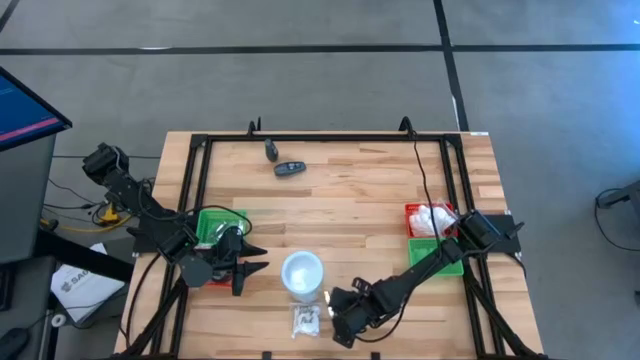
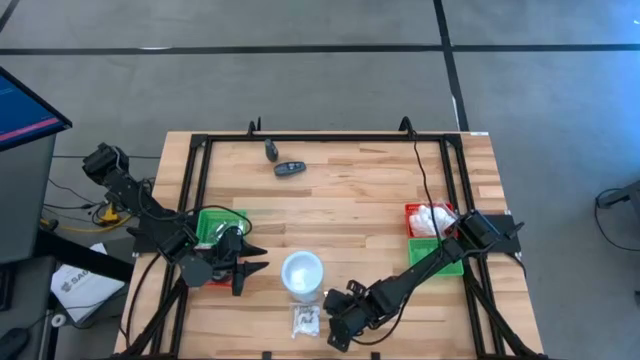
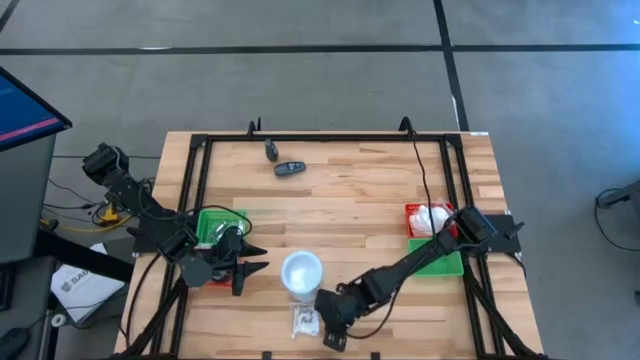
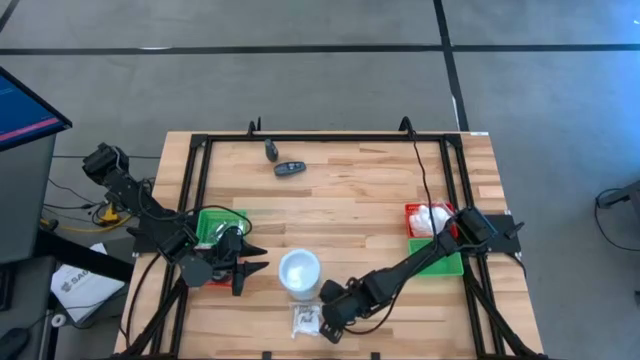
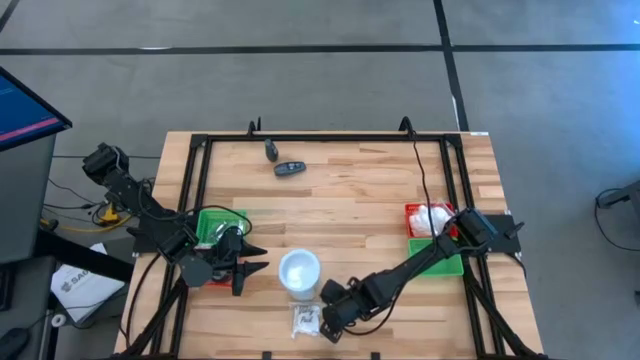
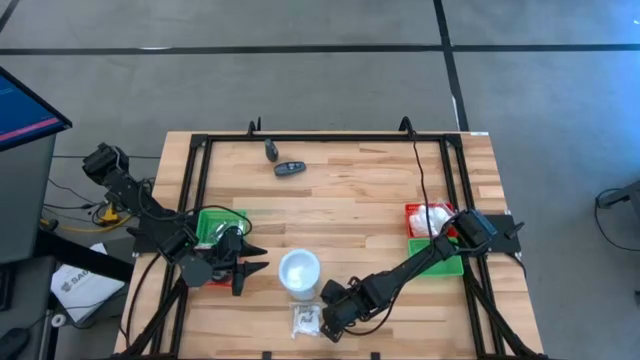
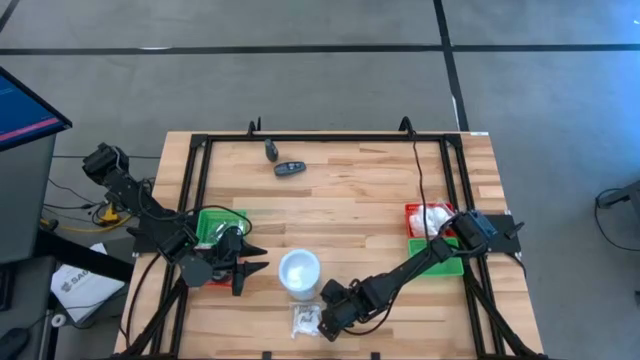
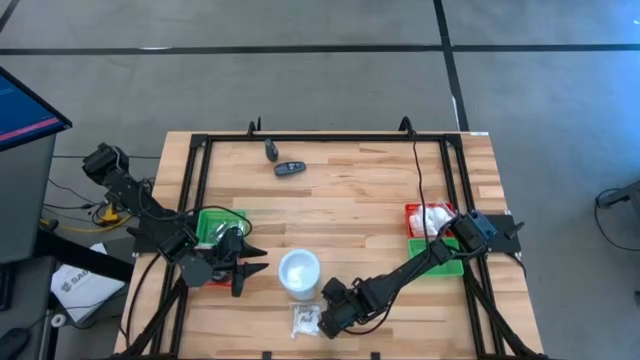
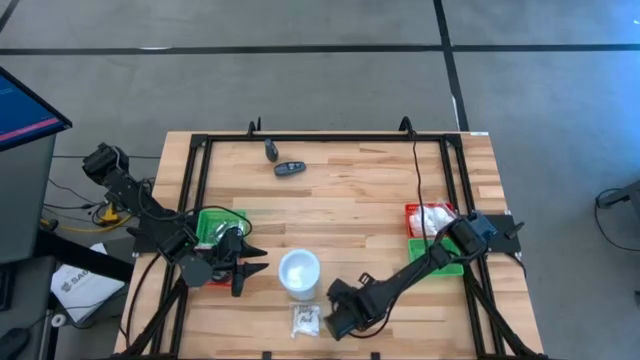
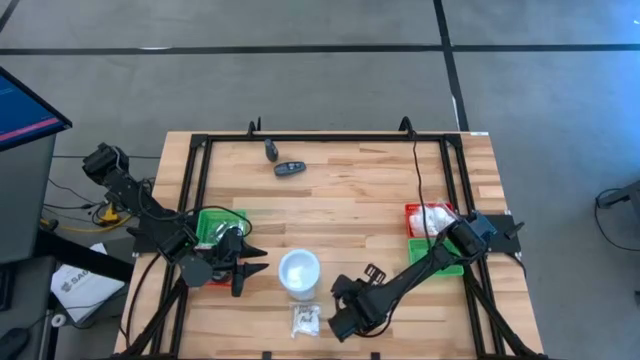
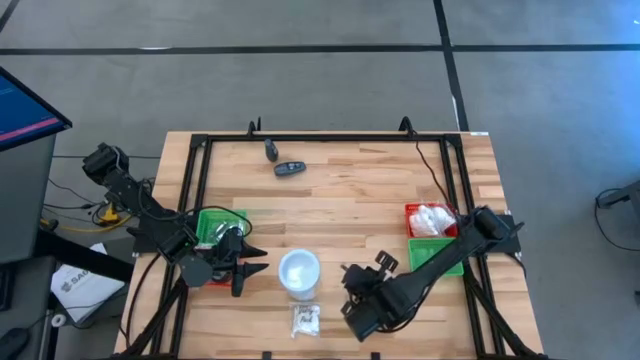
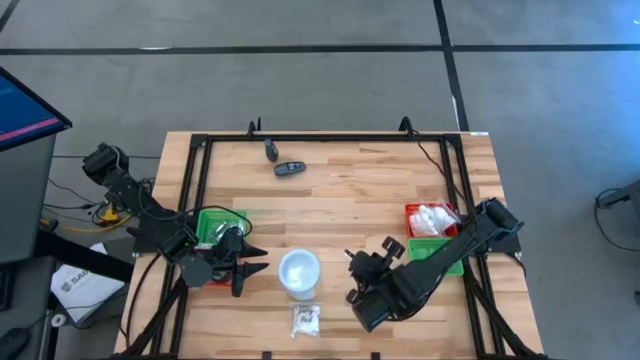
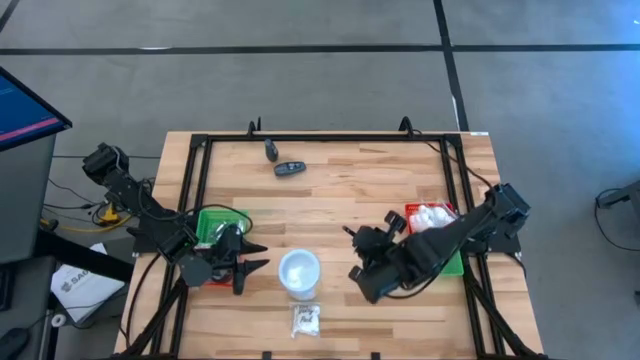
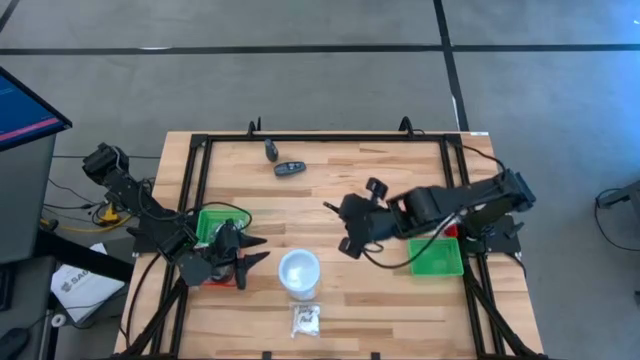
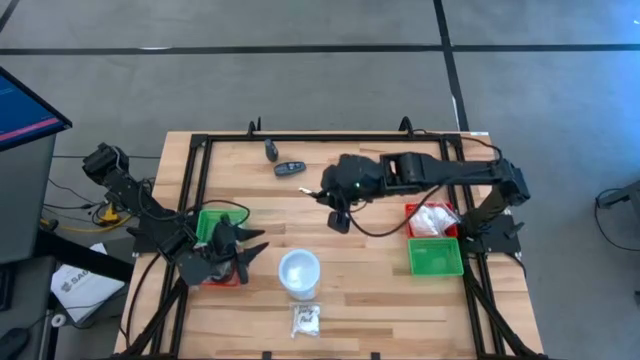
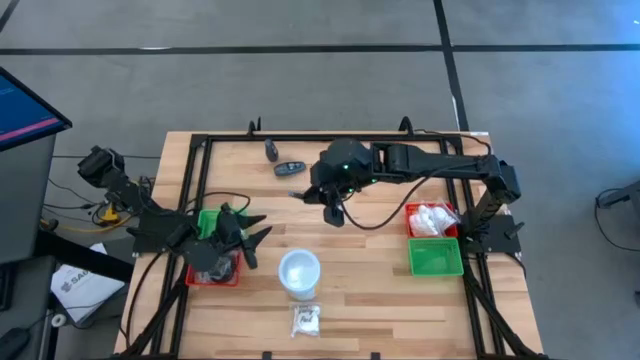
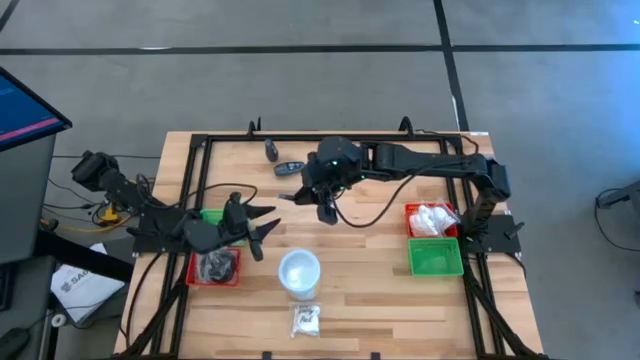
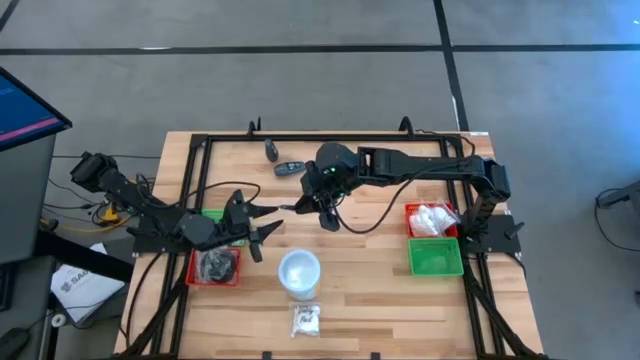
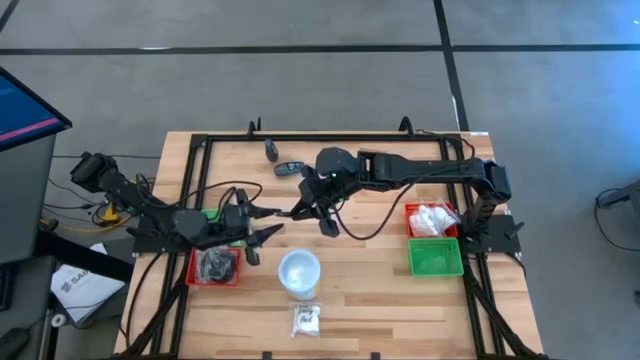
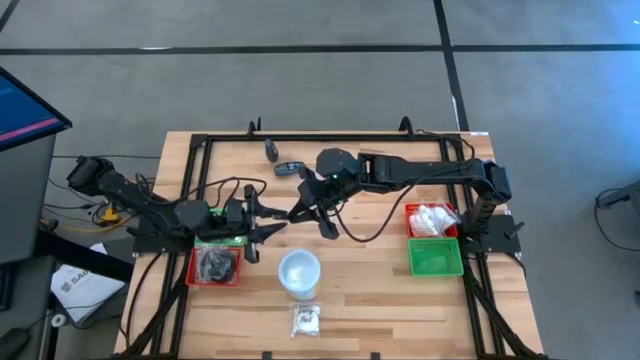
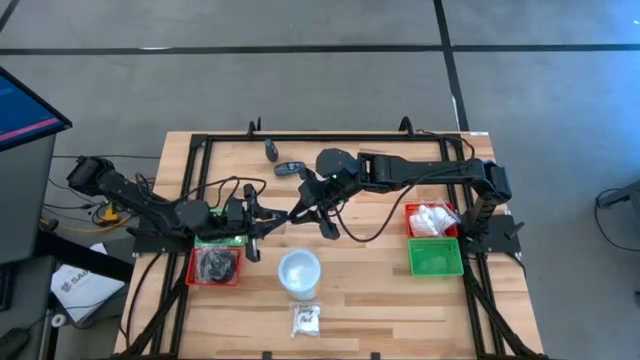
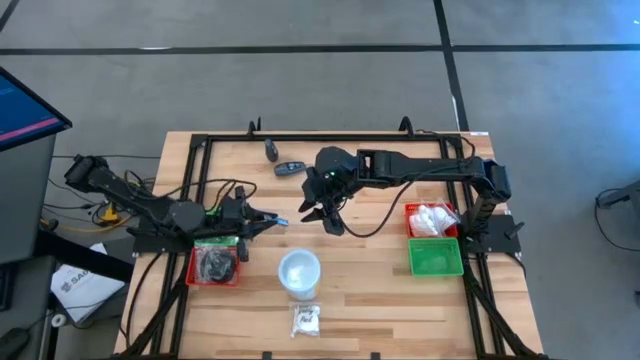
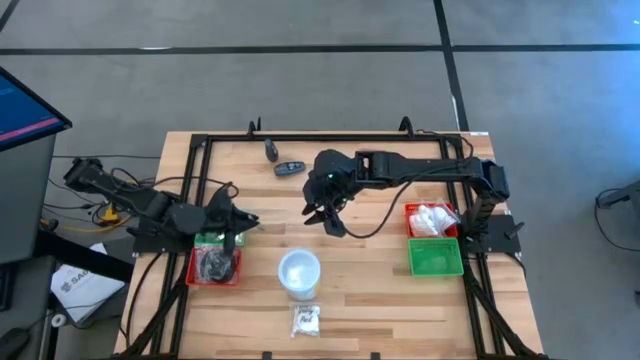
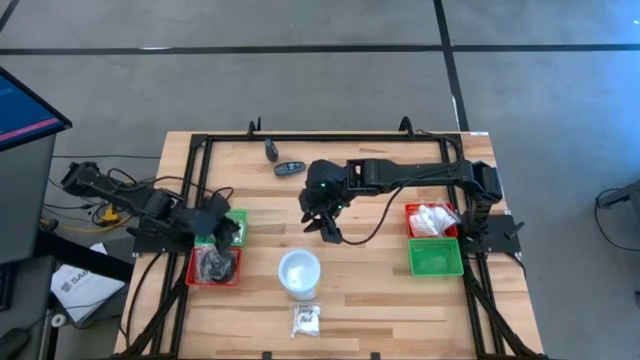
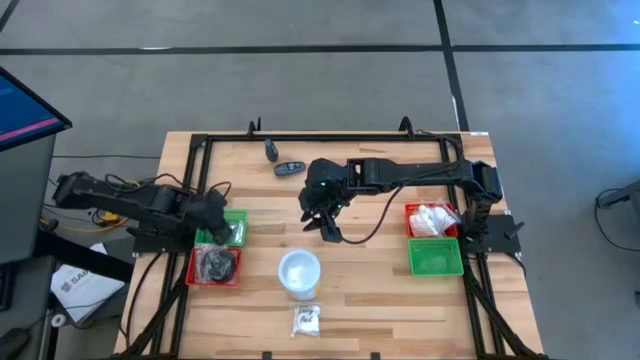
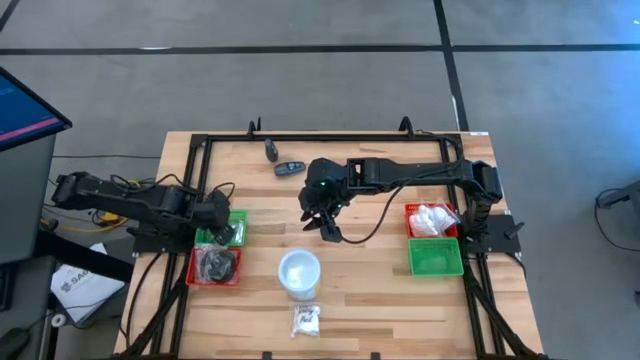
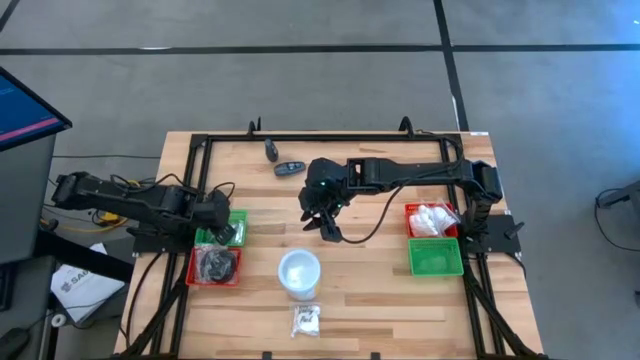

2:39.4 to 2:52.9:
Task: Pick & Place Travel size toiletries
Put the silver nail cutter into the left green bin

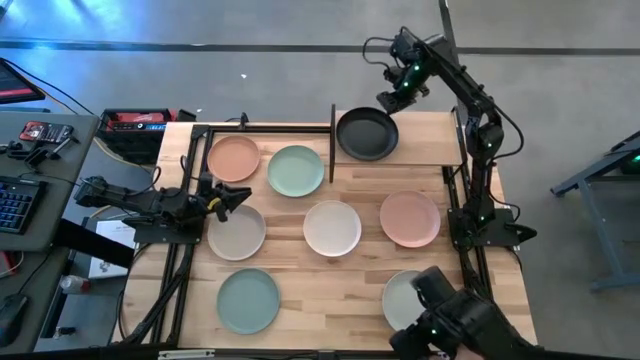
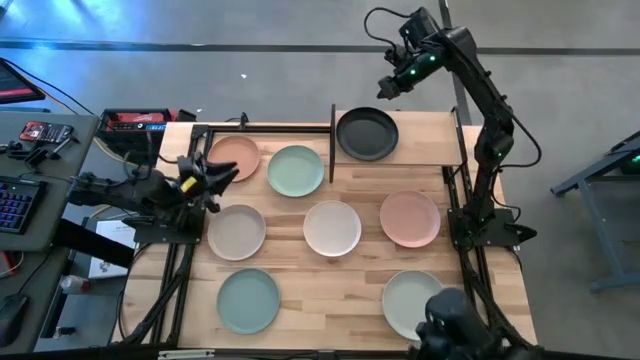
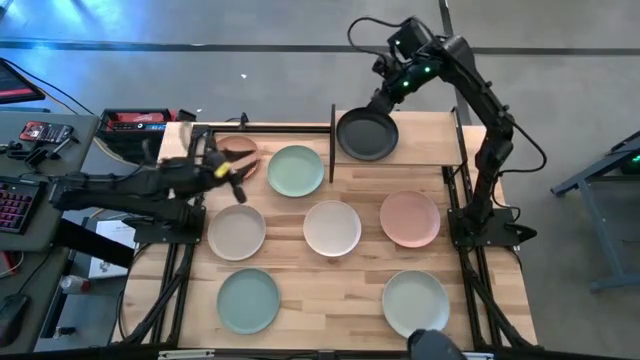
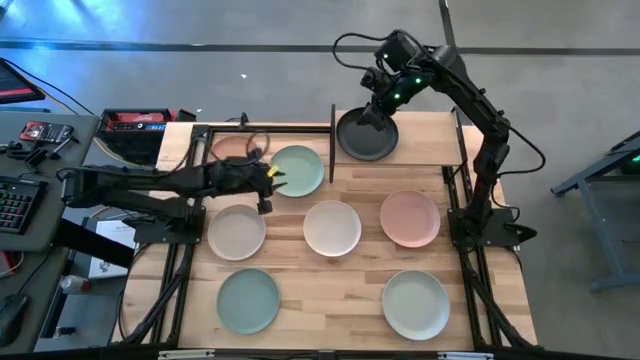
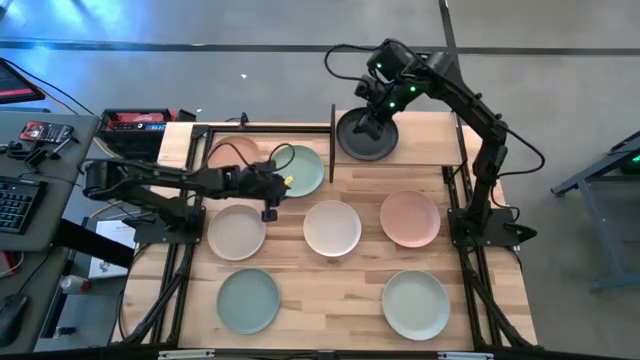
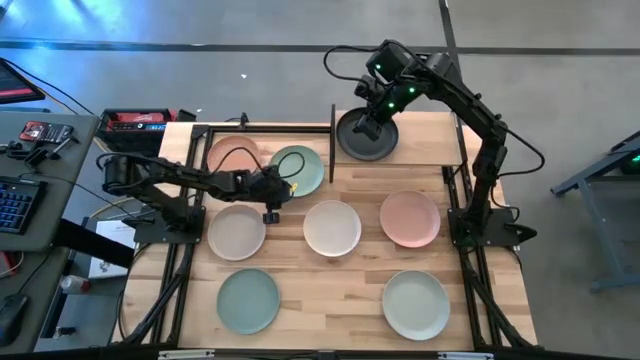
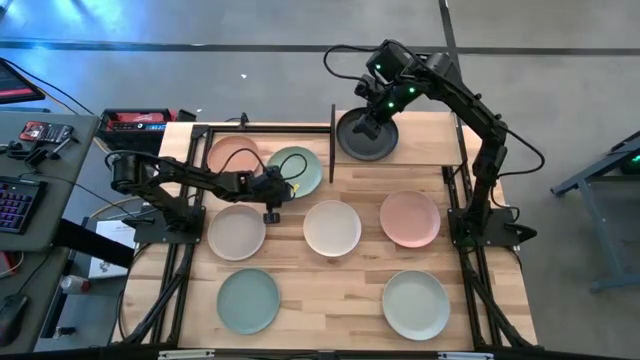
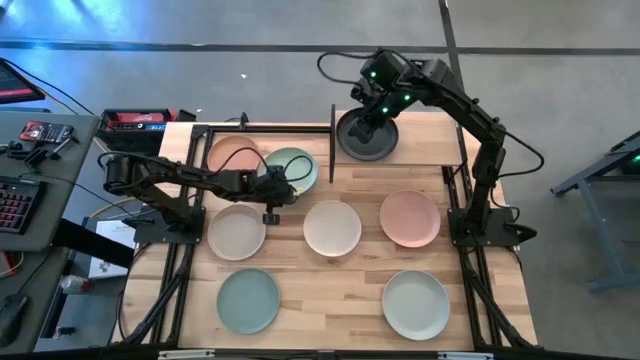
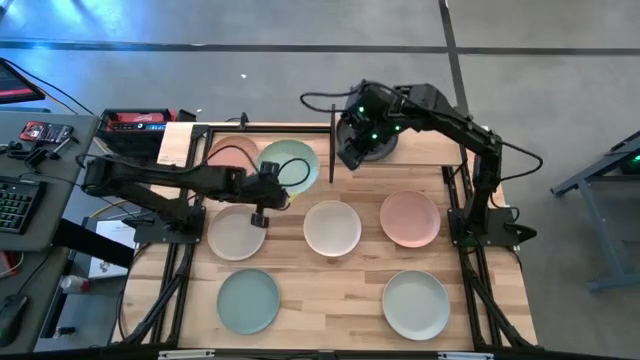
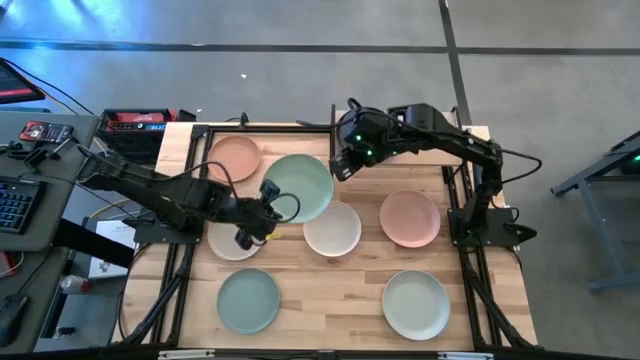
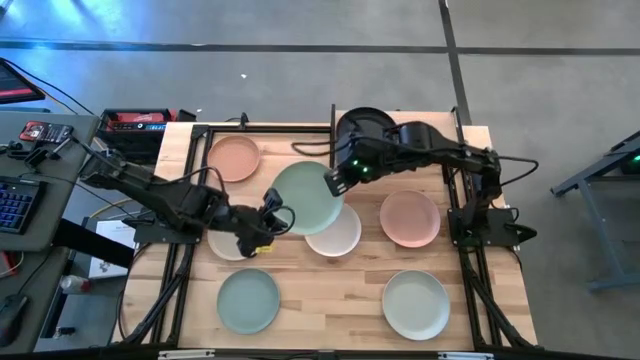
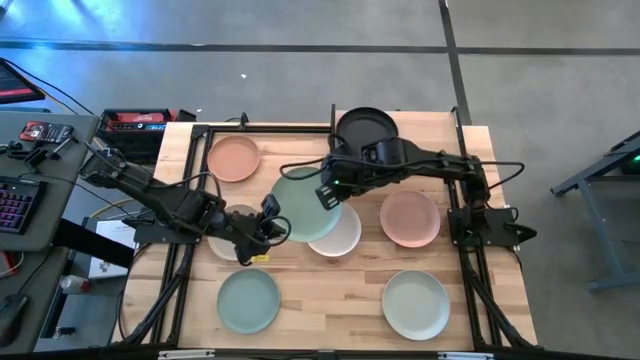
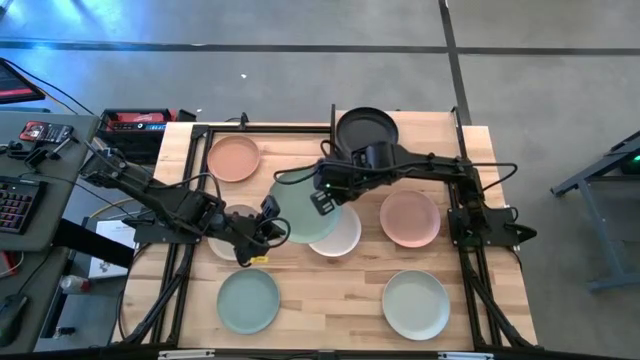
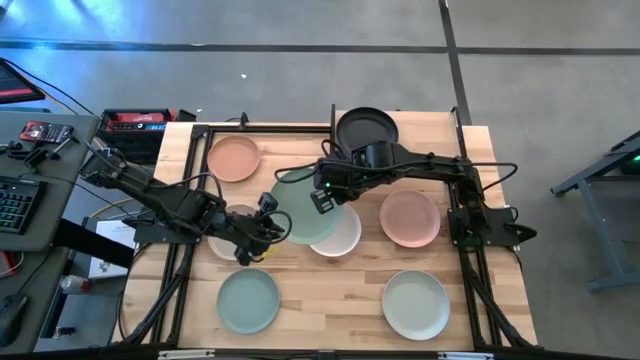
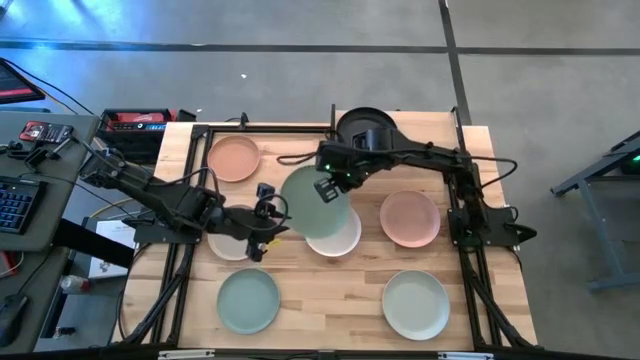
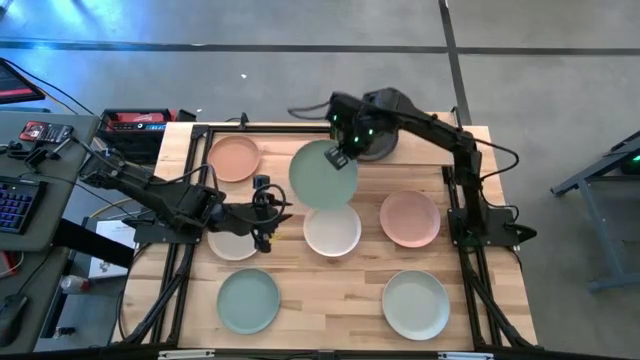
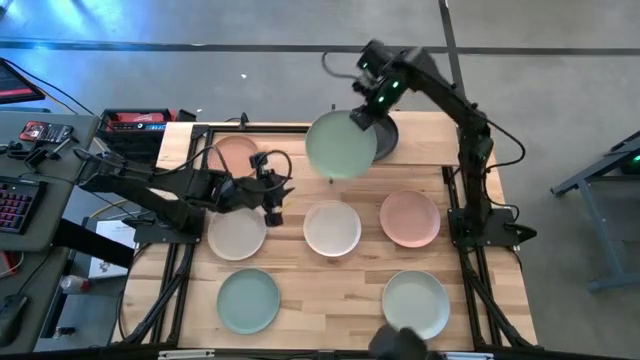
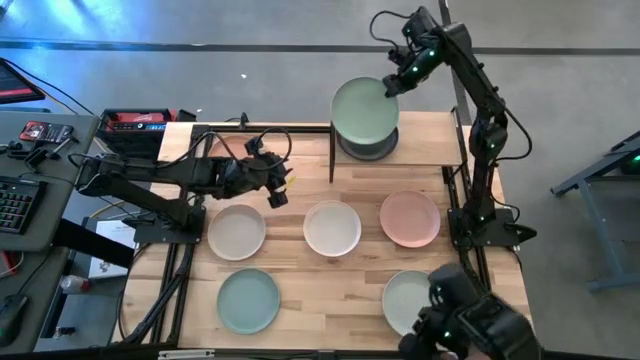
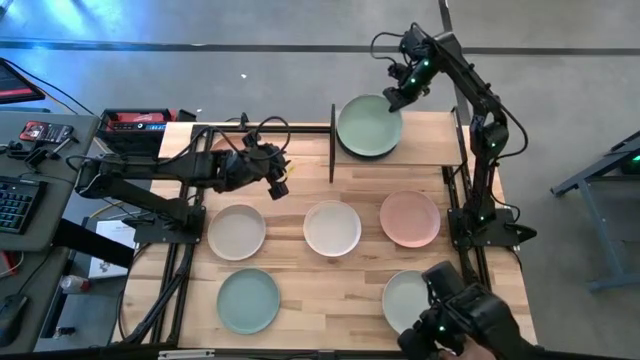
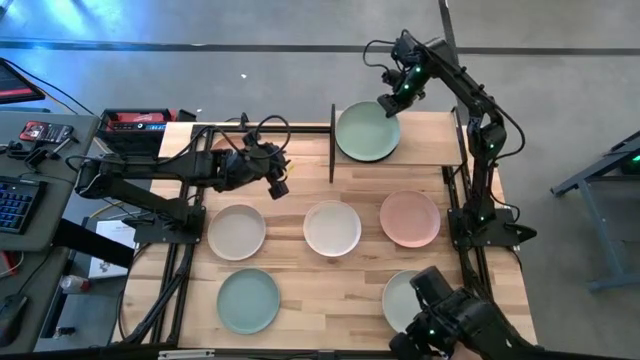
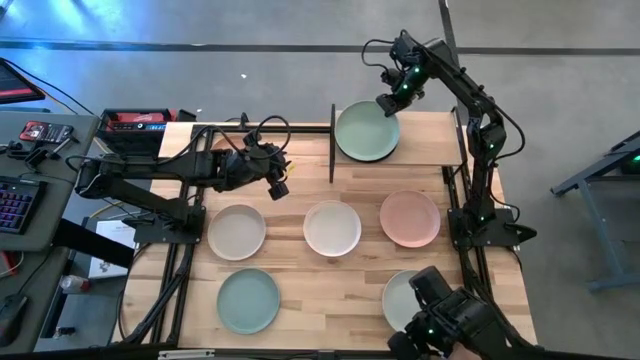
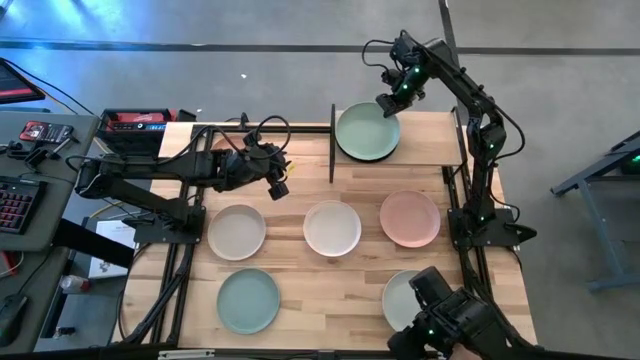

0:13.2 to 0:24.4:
Task: Place and stack plates onto a shelf
Stack the light green plate on top of the black plate on the shelf
